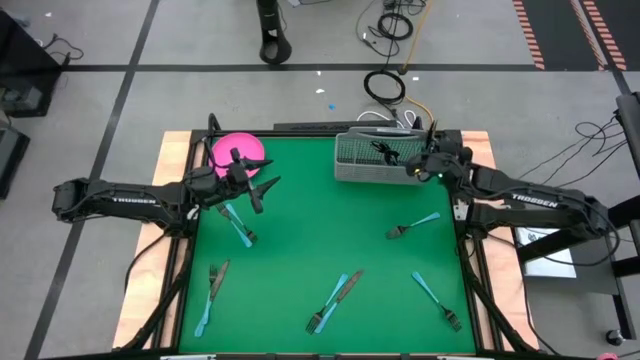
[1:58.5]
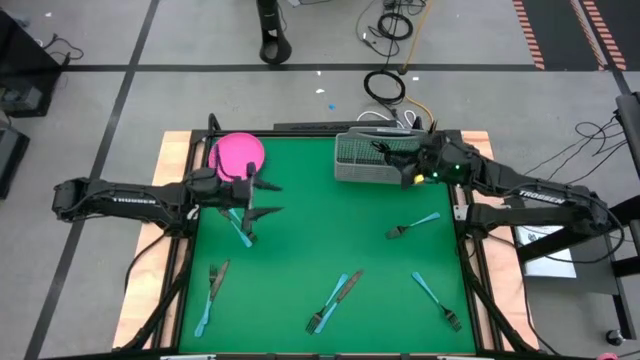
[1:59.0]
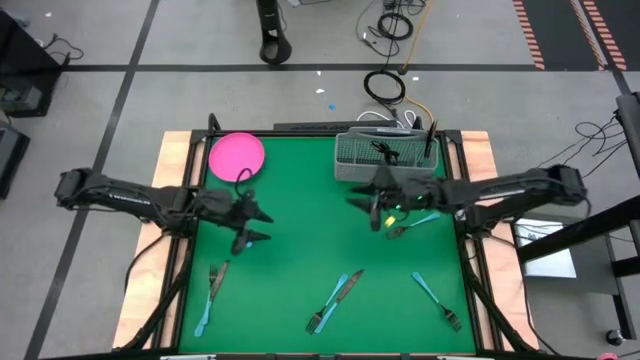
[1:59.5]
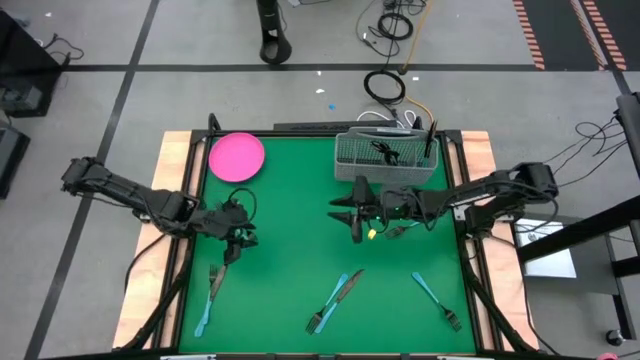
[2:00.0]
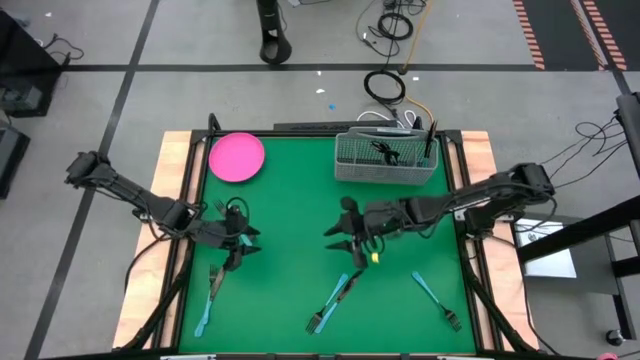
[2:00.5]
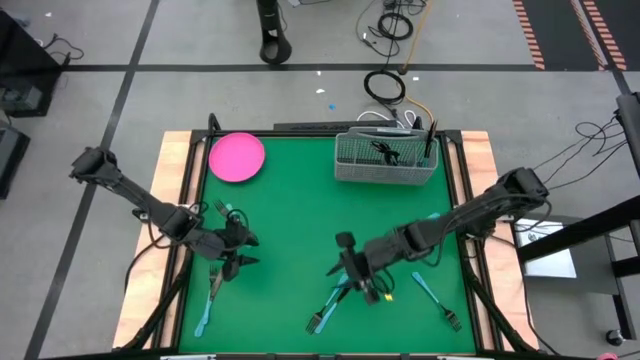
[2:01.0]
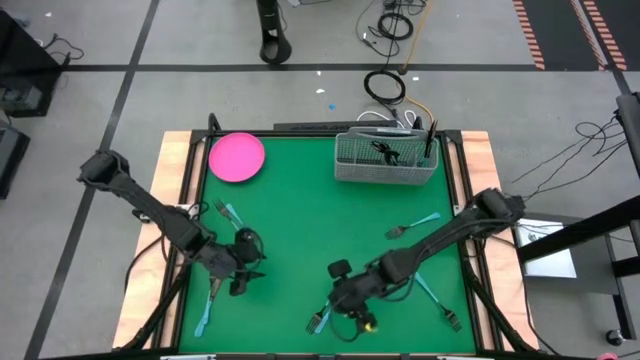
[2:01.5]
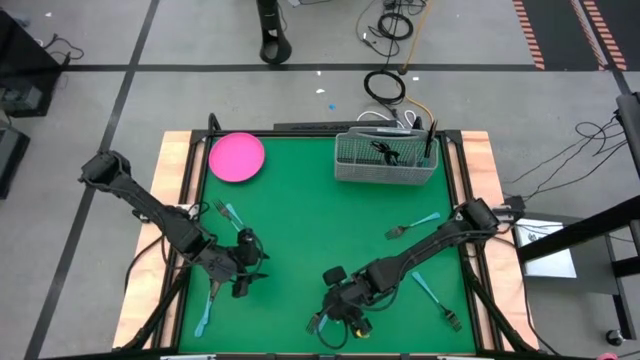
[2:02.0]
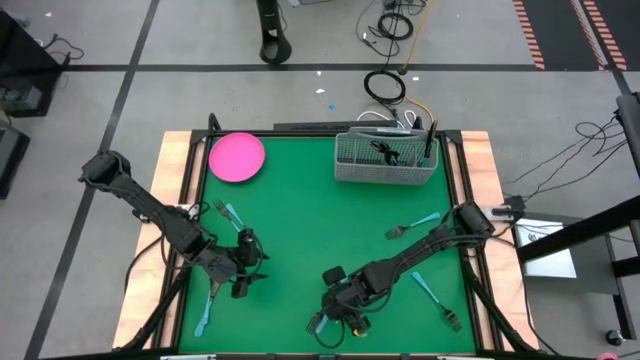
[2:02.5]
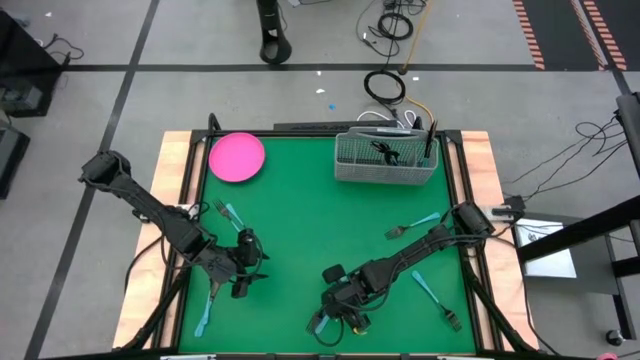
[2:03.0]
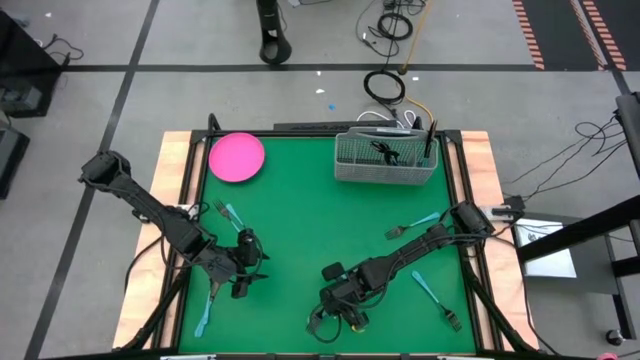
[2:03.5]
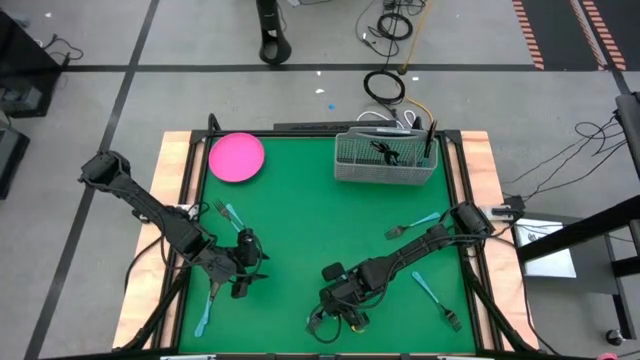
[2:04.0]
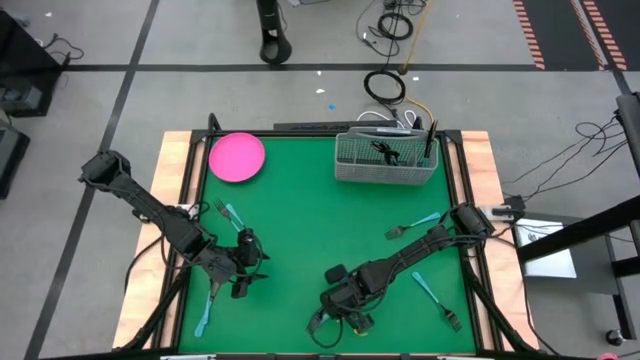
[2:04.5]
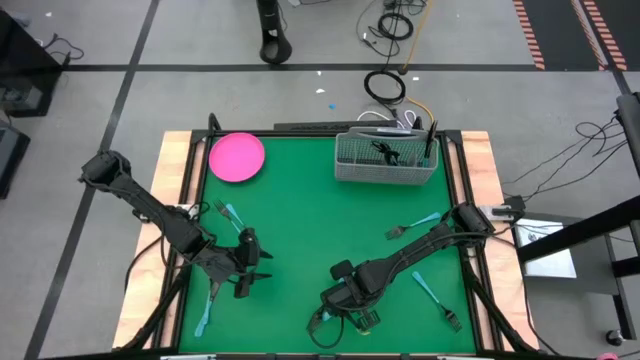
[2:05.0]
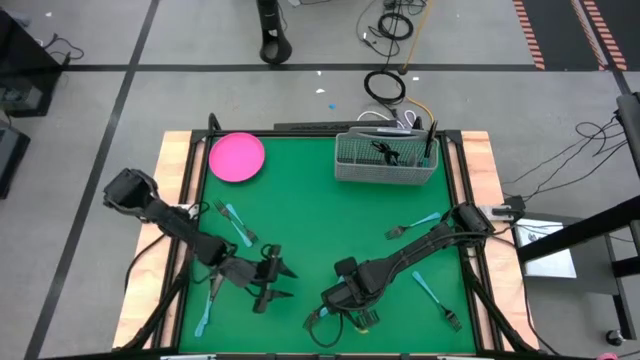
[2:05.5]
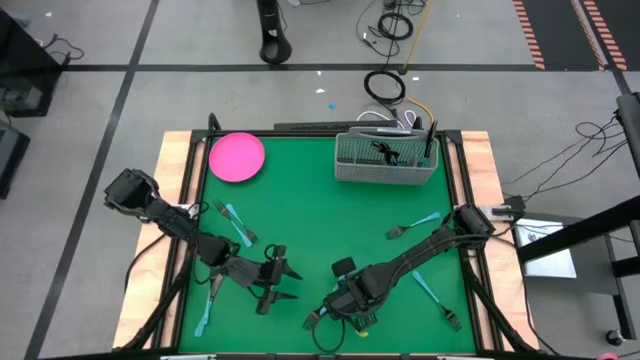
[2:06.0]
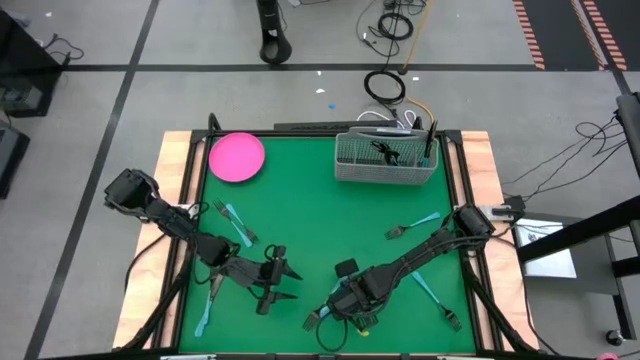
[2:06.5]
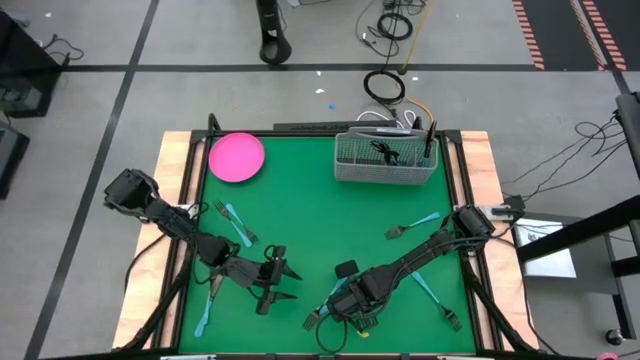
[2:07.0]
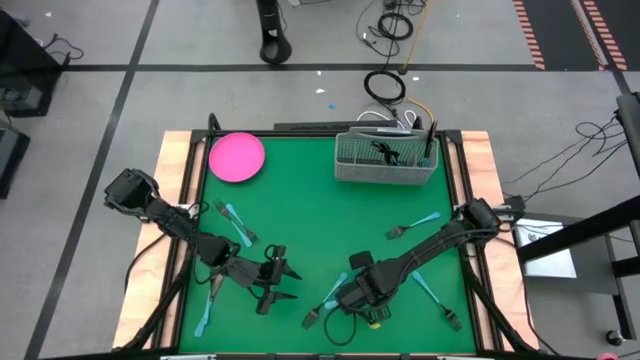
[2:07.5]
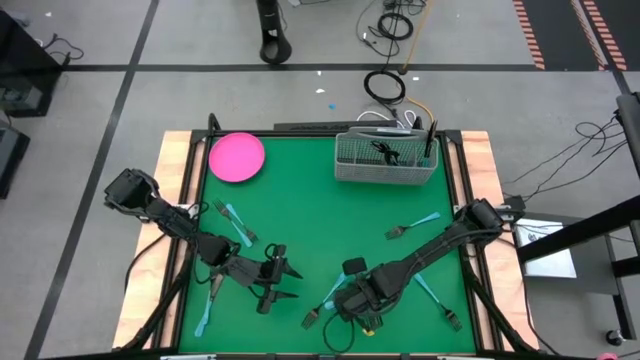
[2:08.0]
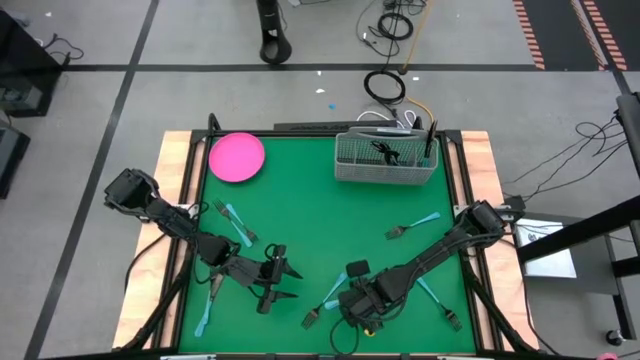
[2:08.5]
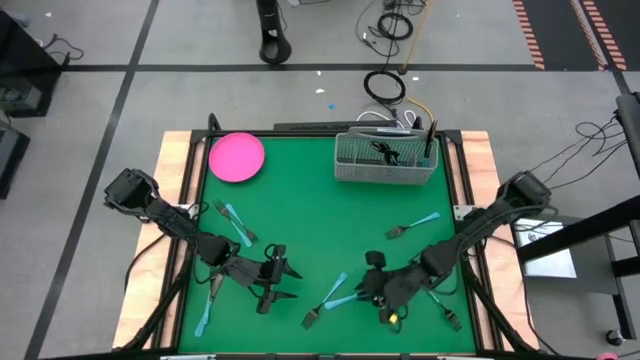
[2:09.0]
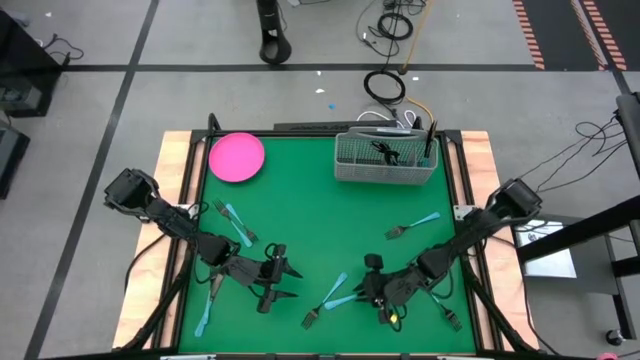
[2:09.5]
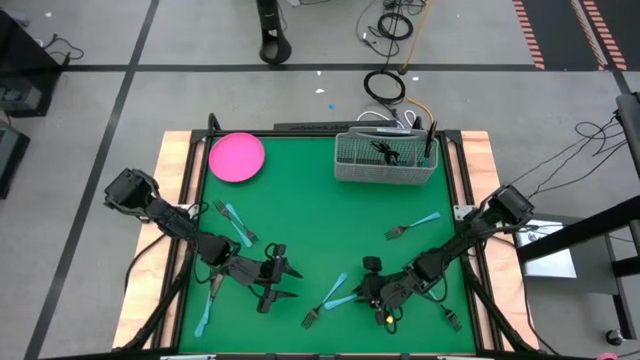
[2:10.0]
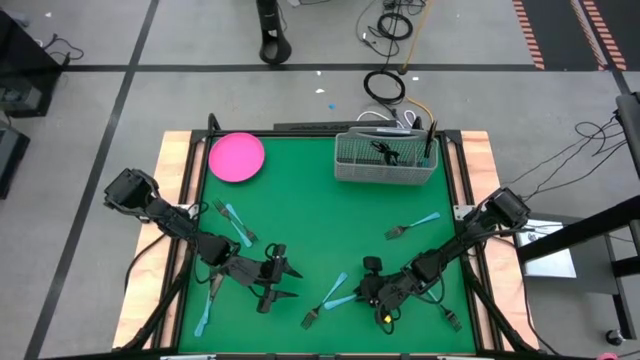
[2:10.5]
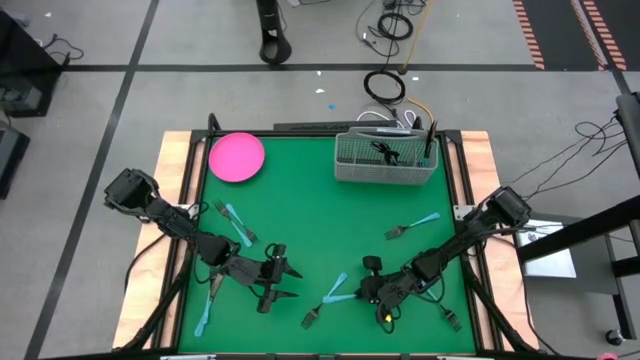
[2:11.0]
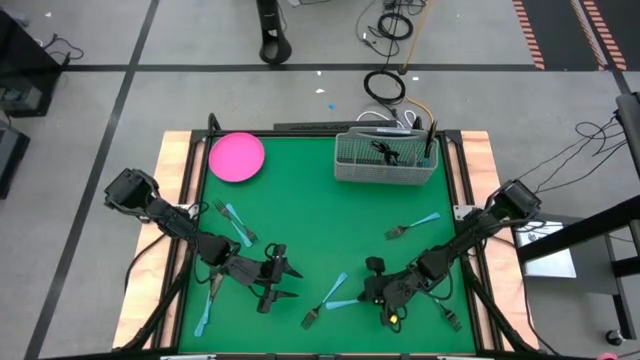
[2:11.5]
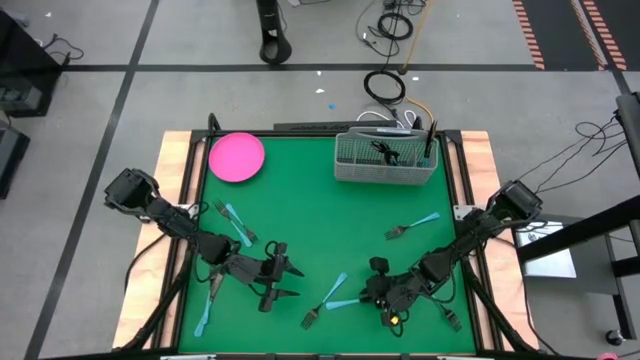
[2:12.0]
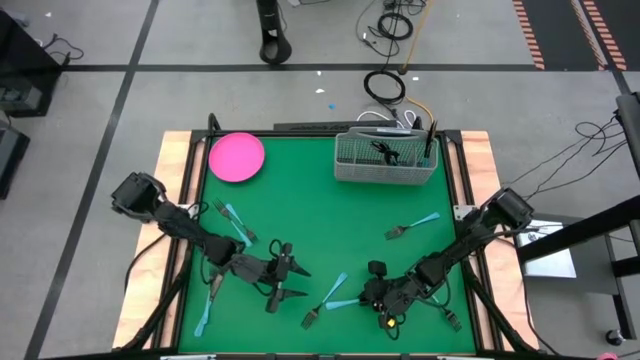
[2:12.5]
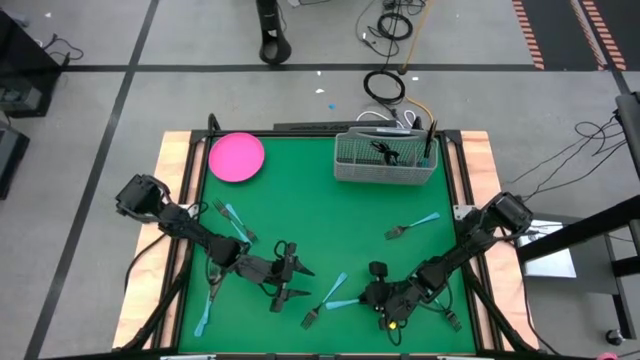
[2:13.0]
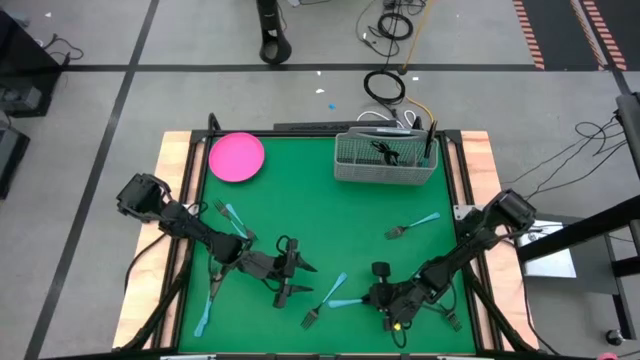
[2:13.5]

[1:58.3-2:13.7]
Task: Sort silverware
Put the right black knife into the cutlery rack with the other black knives

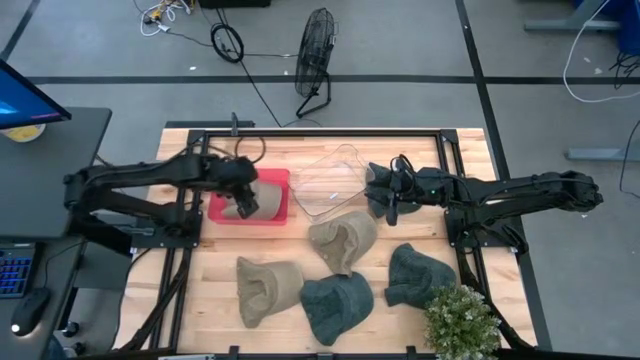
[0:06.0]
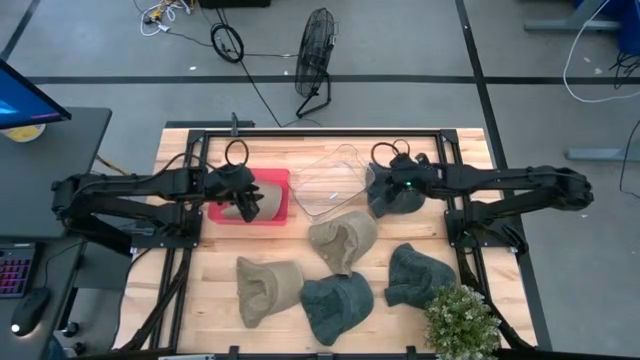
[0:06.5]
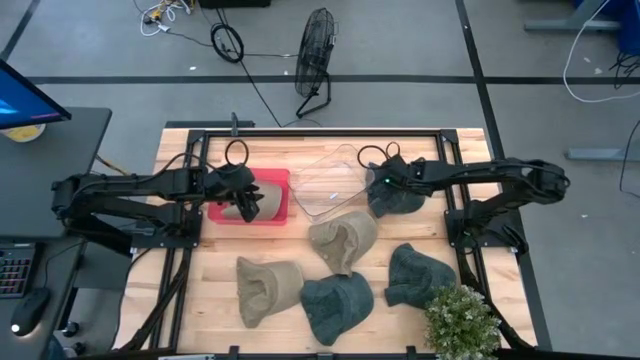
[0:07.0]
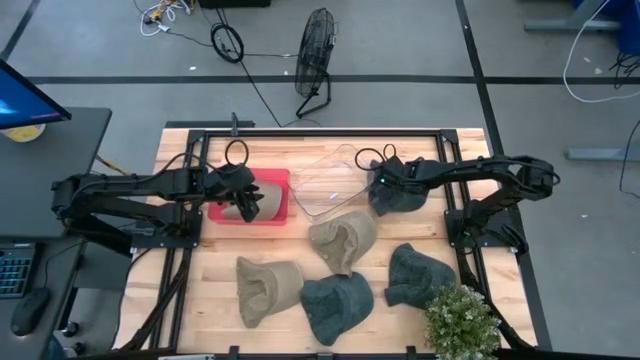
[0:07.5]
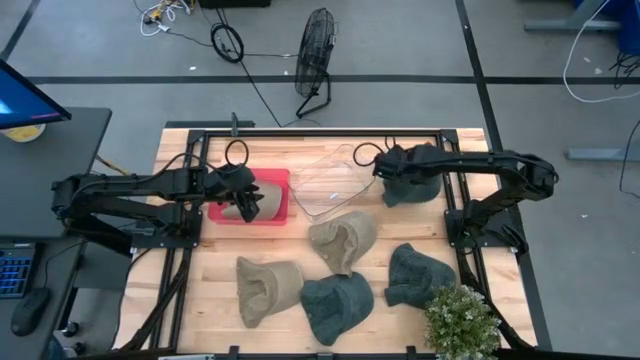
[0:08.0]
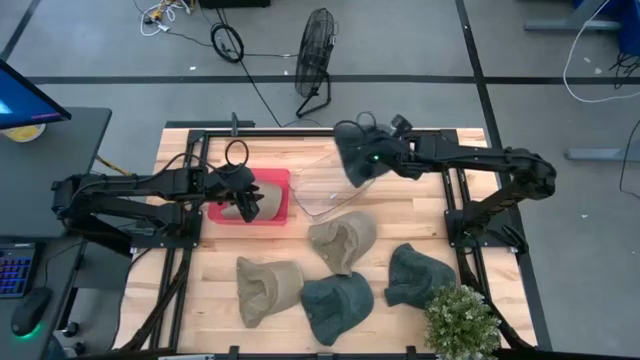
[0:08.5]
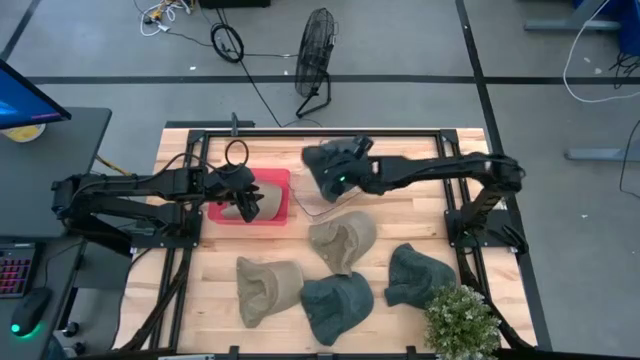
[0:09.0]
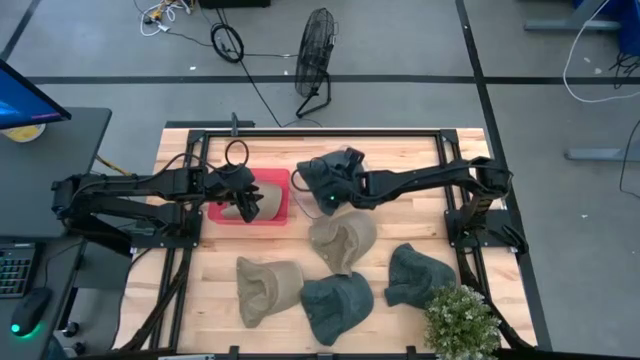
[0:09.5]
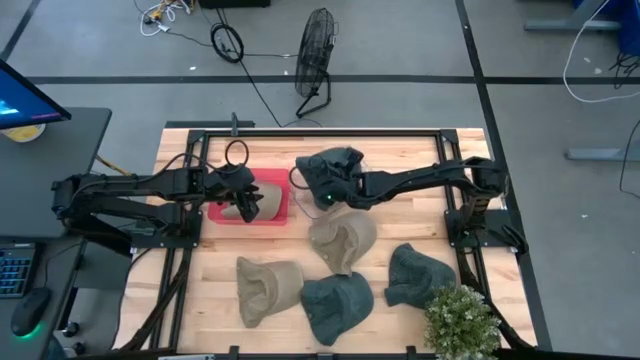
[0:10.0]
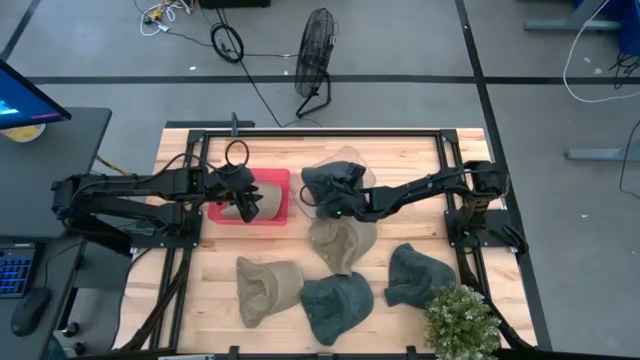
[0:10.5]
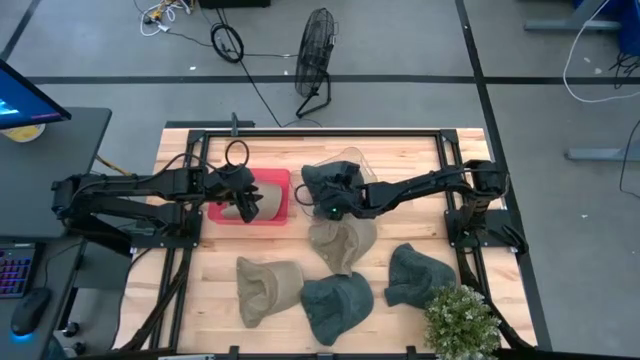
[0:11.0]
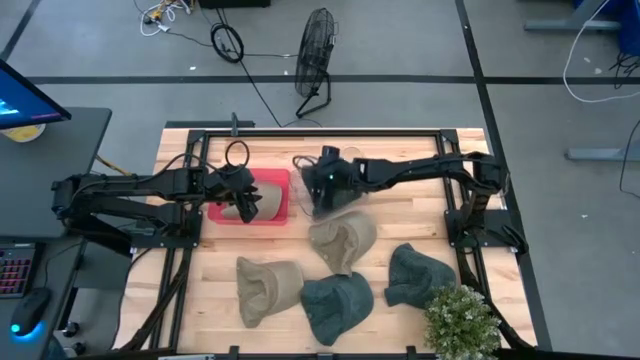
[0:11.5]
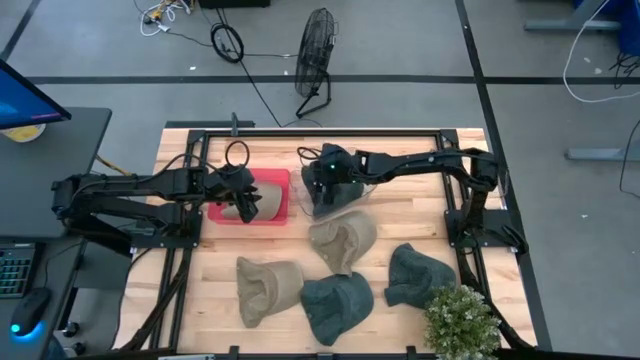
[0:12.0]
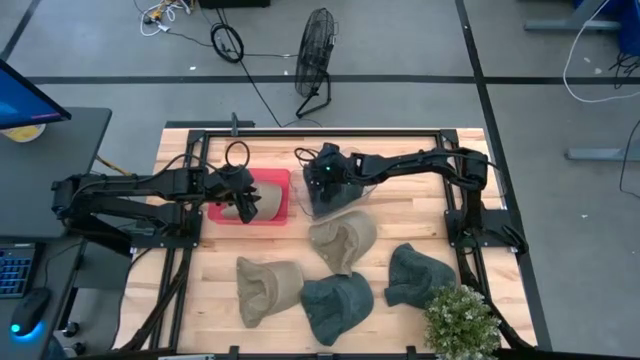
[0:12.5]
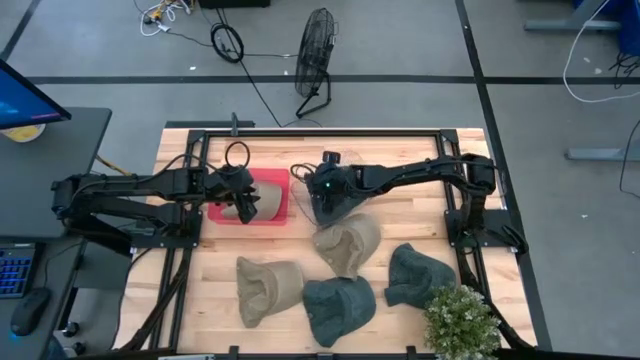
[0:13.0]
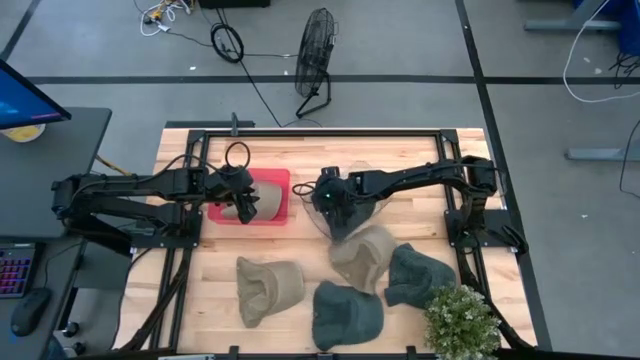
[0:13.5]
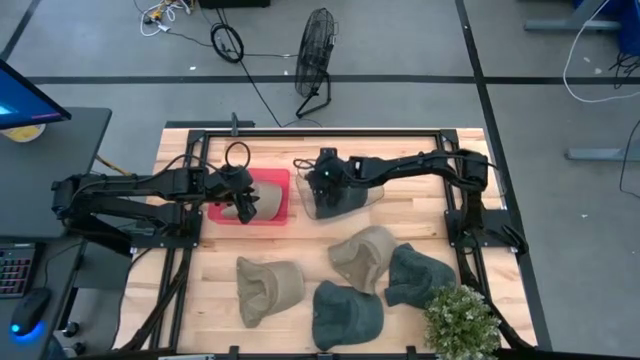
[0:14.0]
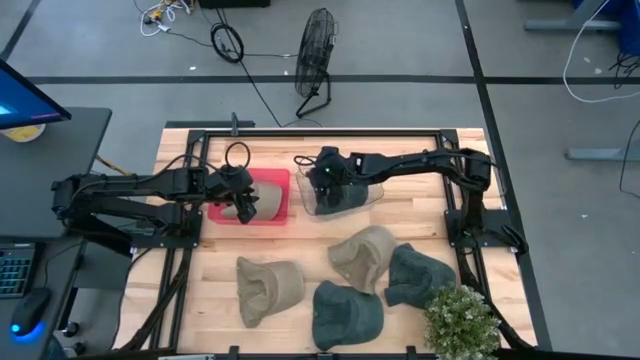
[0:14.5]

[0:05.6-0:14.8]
Task: Pick & Place hat
Put the top right black cap into the transparent bin
